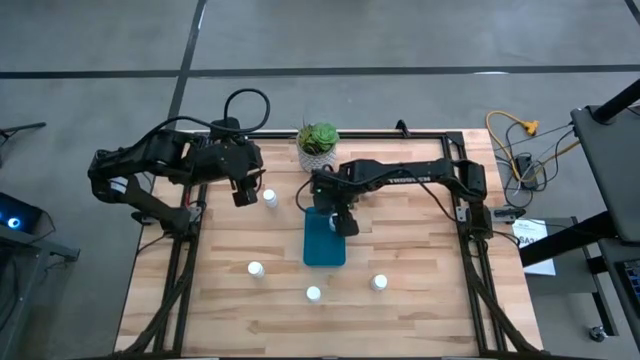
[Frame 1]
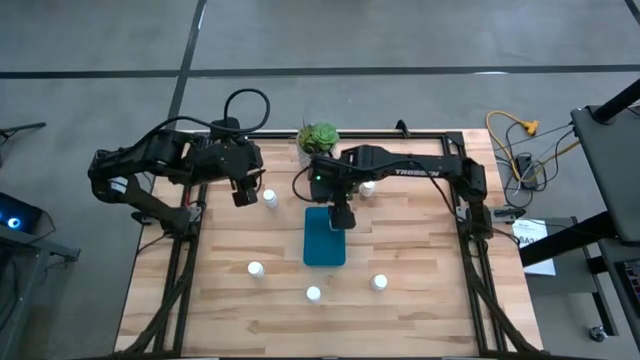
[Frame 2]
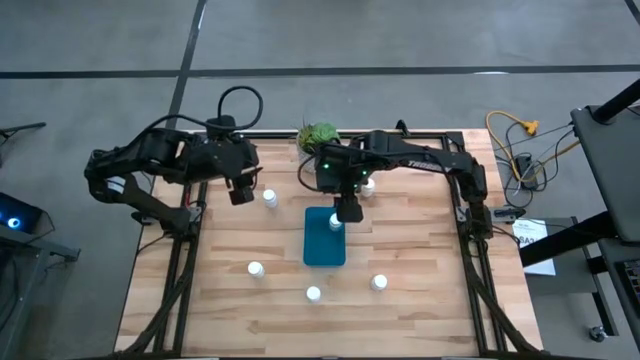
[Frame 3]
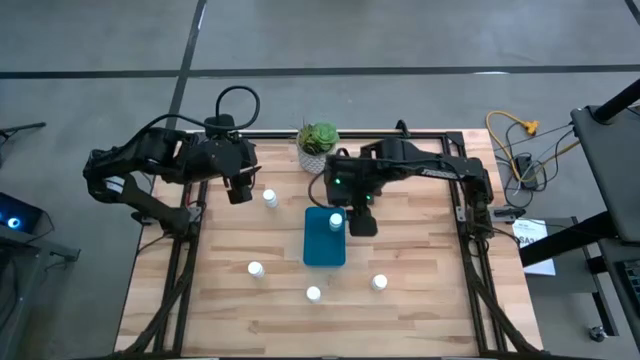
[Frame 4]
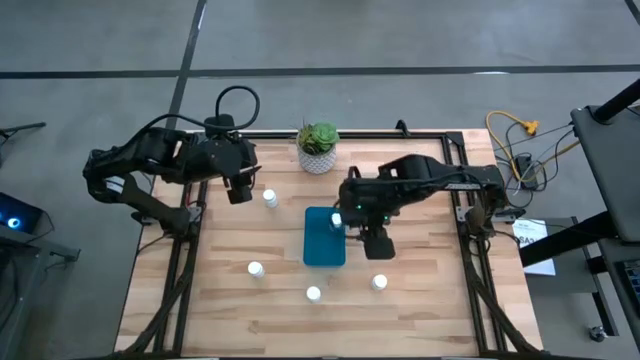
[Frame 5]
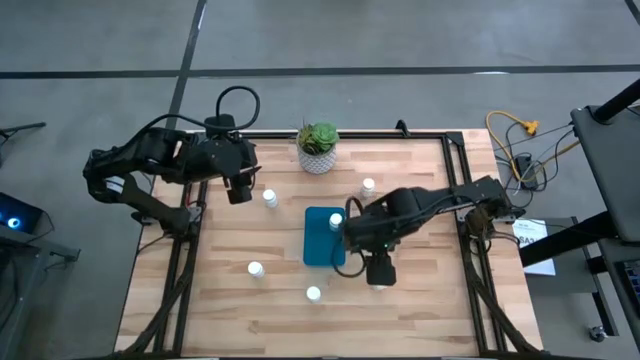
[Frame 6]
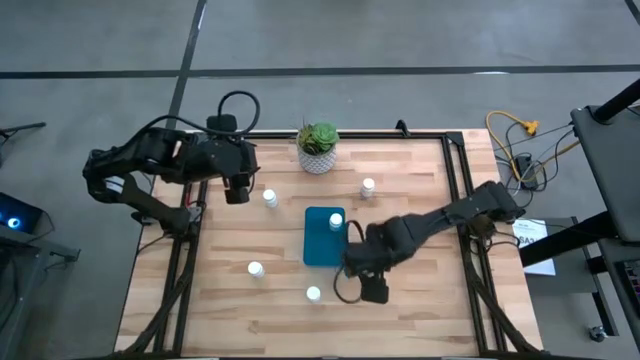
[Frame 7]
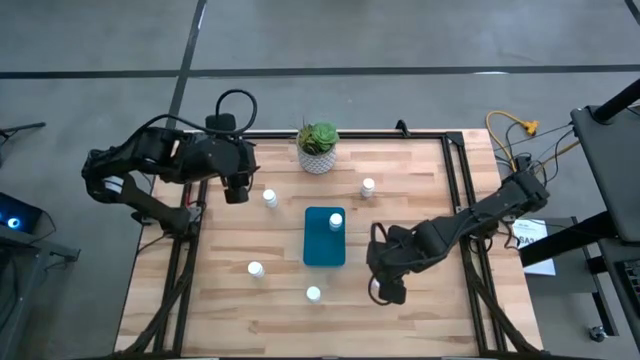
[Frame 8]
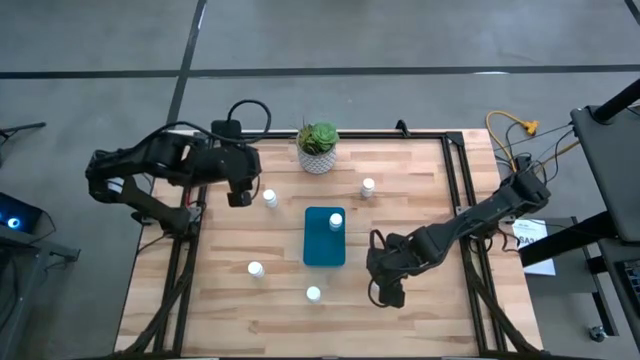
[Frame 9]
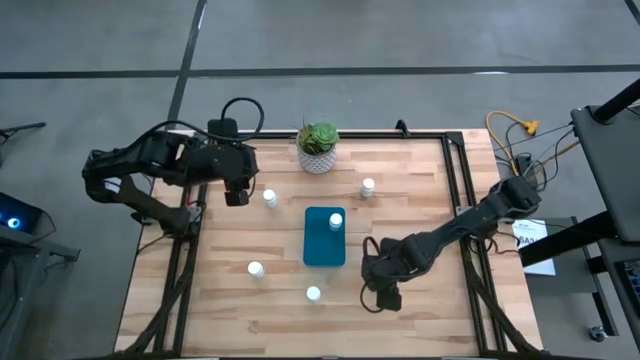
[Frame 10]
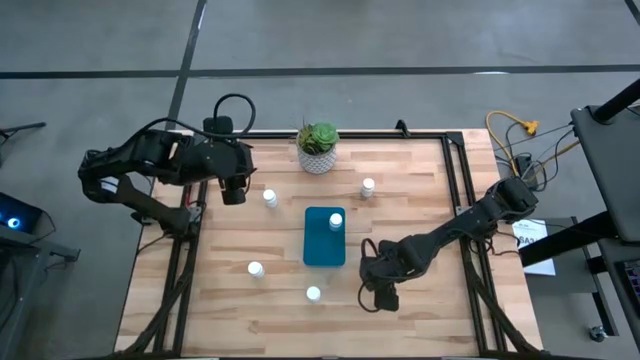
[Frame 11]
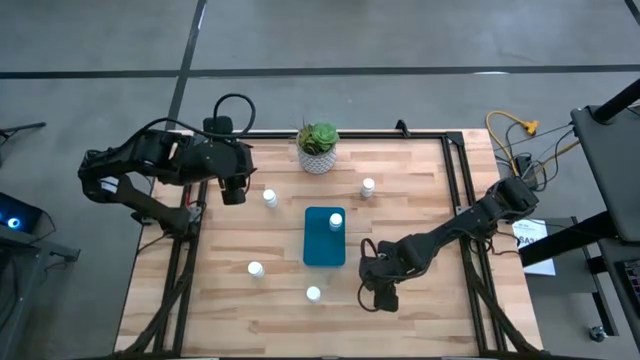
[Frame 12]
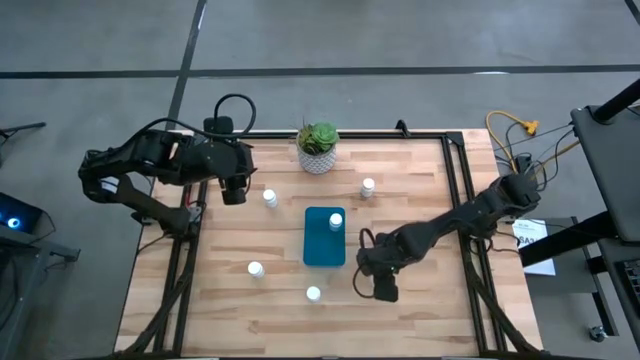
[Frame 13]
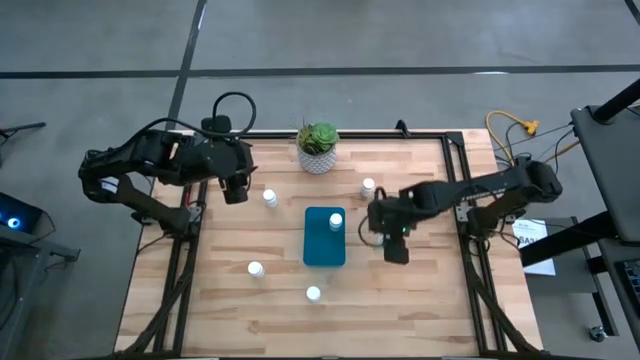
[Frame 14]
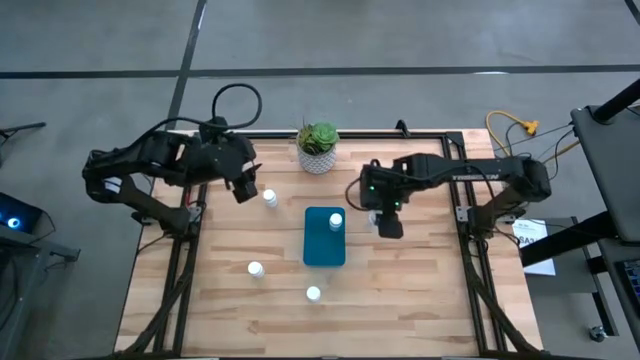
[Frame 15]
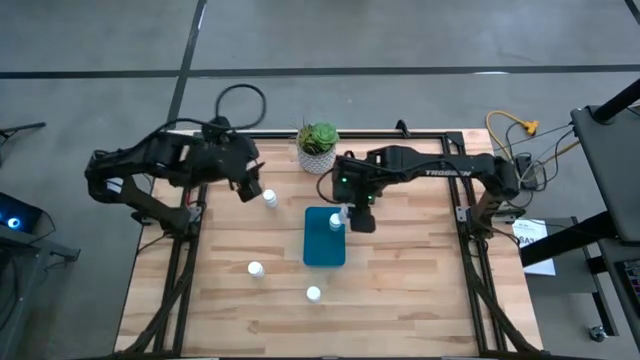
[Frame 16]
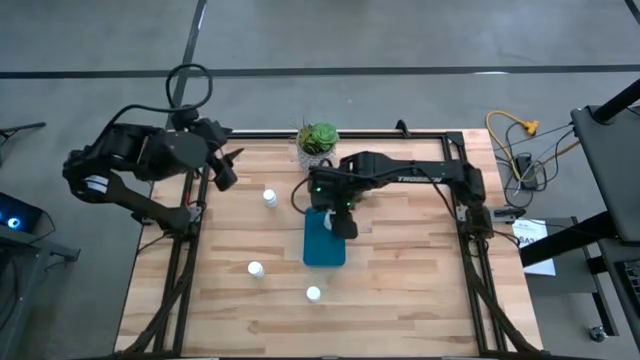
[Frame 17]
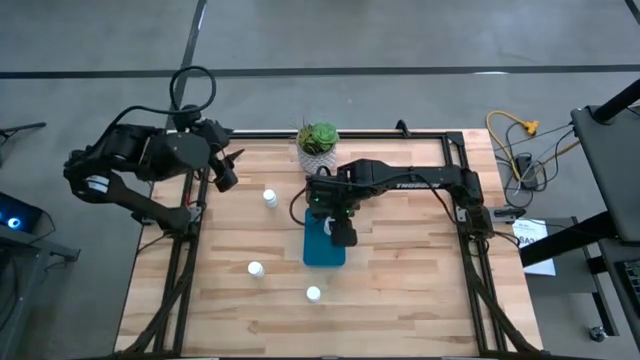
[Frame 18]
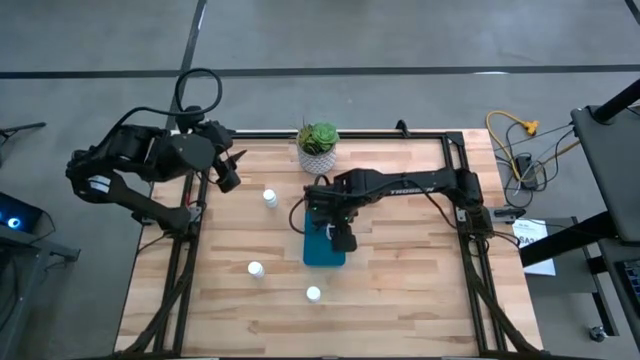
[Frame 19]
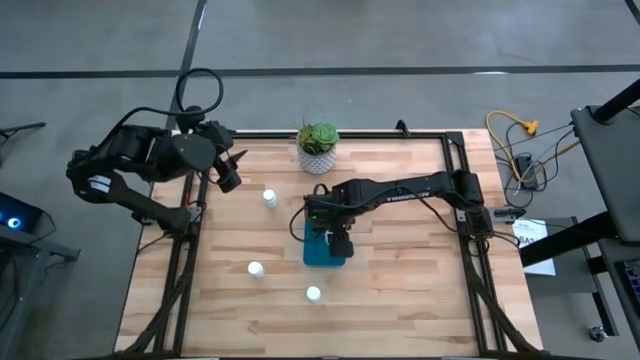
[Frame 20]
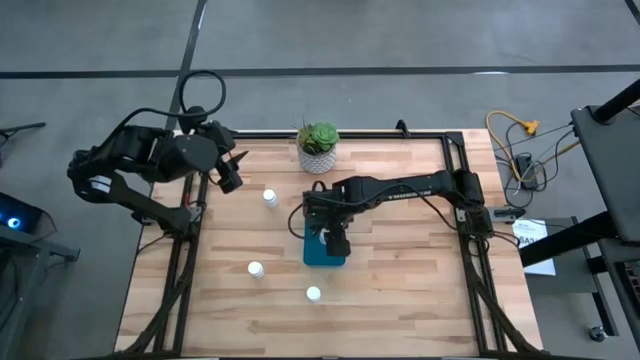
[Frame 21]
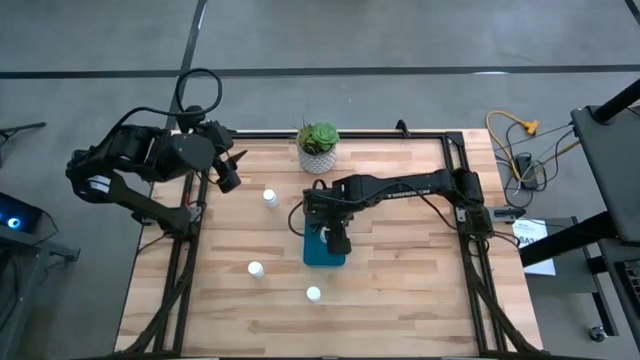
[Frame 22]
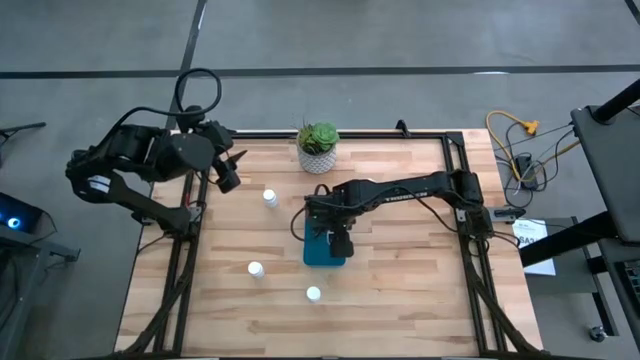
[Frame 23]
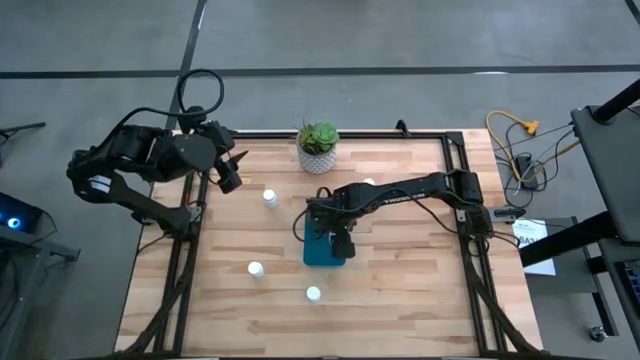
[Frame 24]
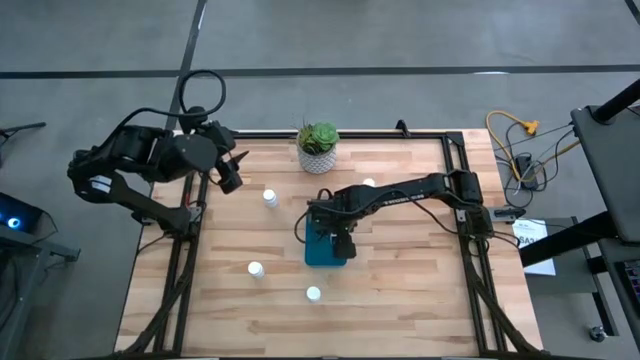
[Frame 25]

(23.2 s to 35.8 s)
Task: Pick and place pill bottles into a basket
Put the white medicine bottle into the blue bin

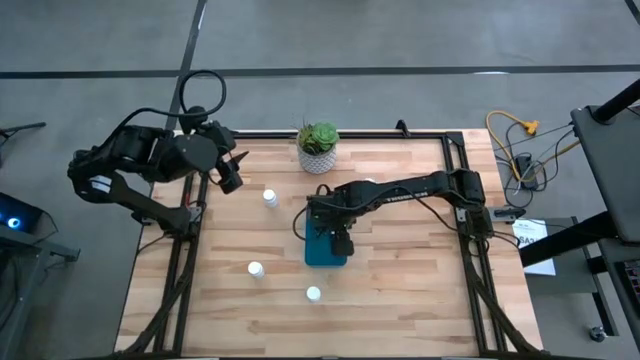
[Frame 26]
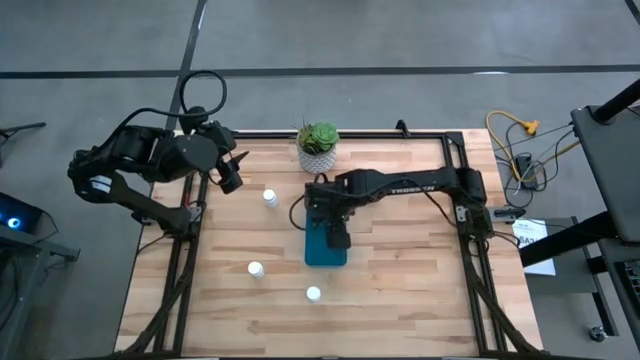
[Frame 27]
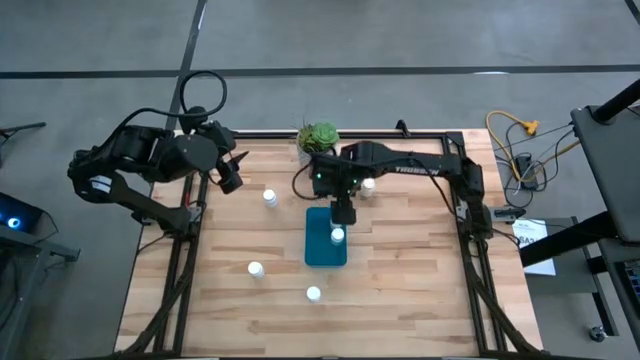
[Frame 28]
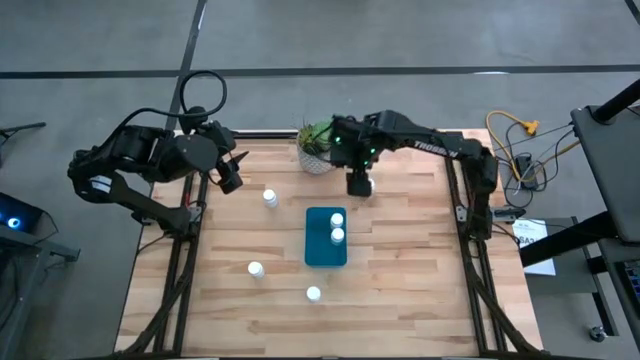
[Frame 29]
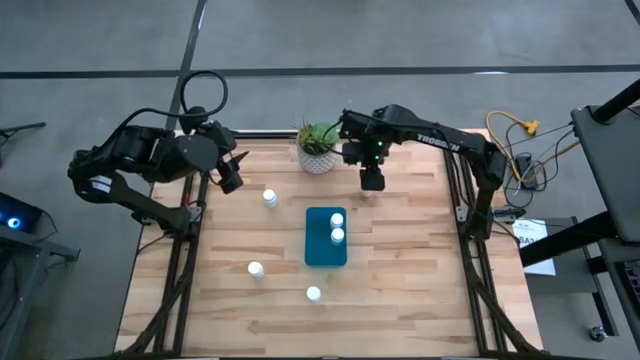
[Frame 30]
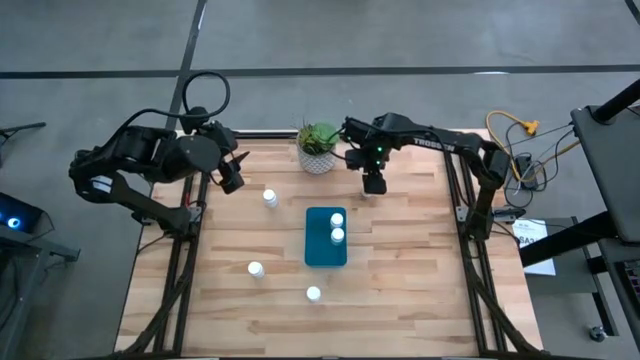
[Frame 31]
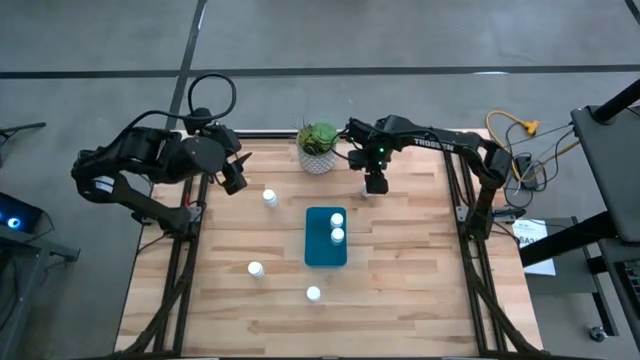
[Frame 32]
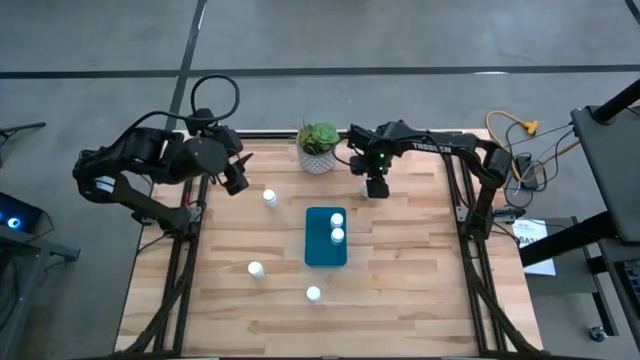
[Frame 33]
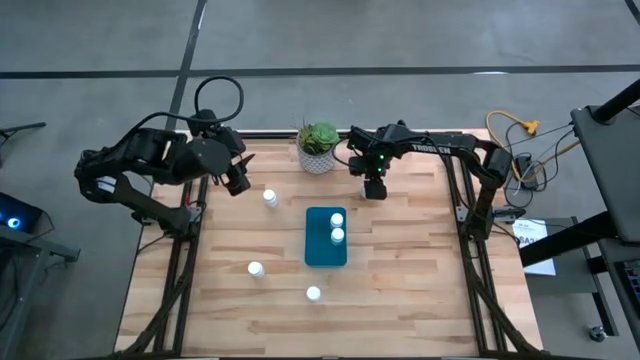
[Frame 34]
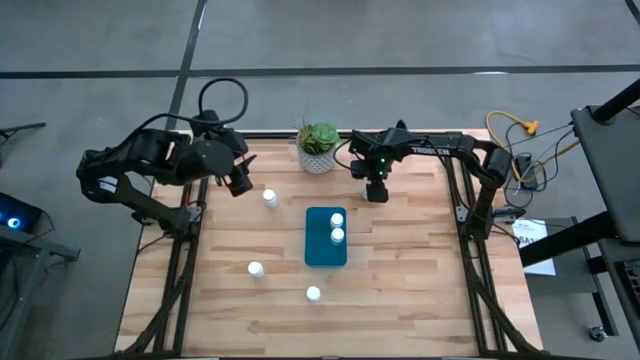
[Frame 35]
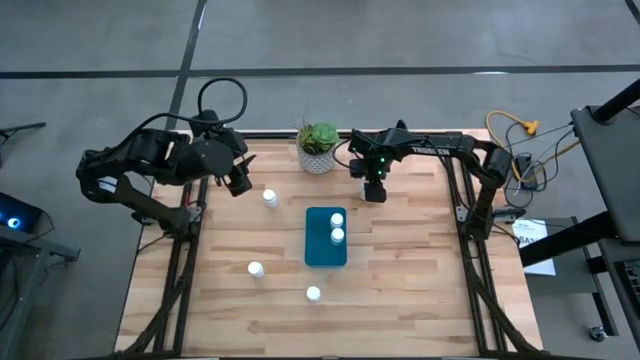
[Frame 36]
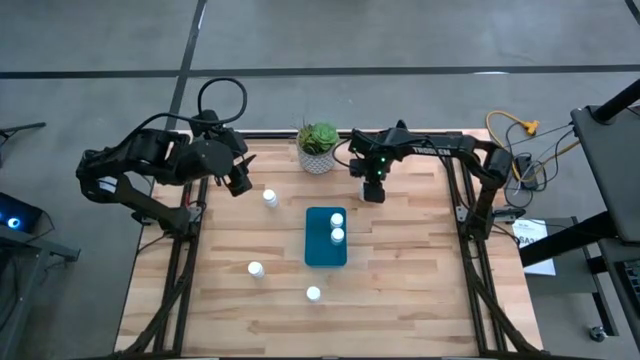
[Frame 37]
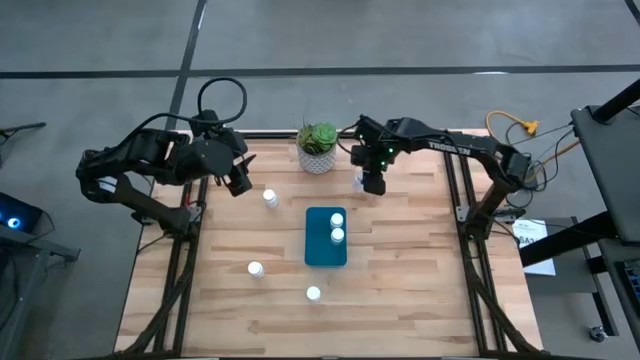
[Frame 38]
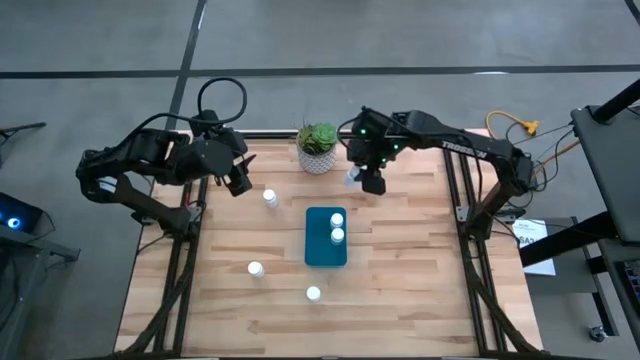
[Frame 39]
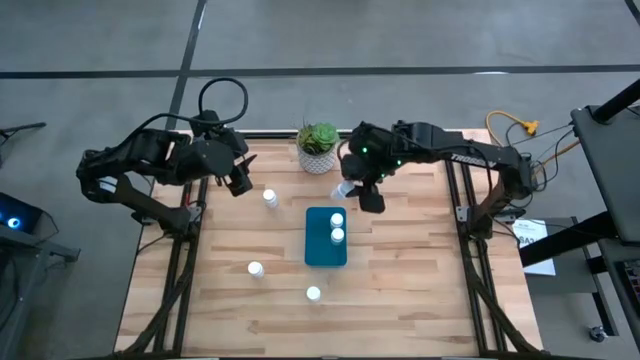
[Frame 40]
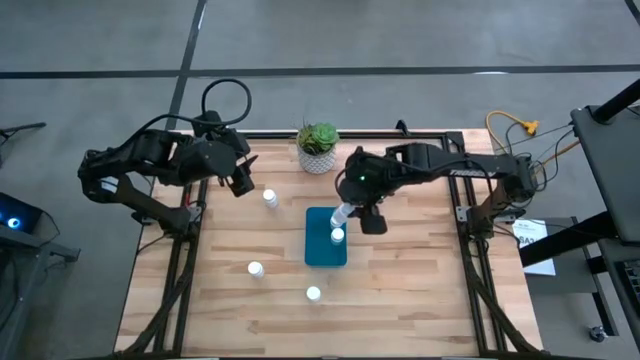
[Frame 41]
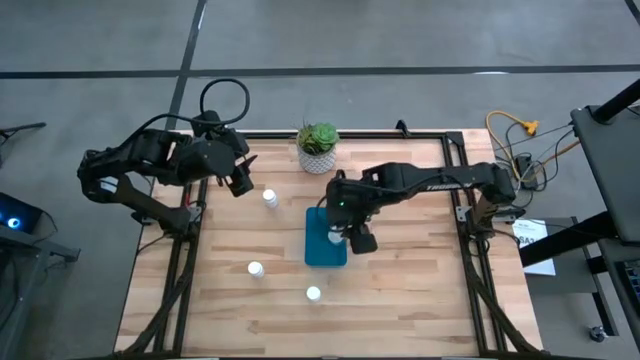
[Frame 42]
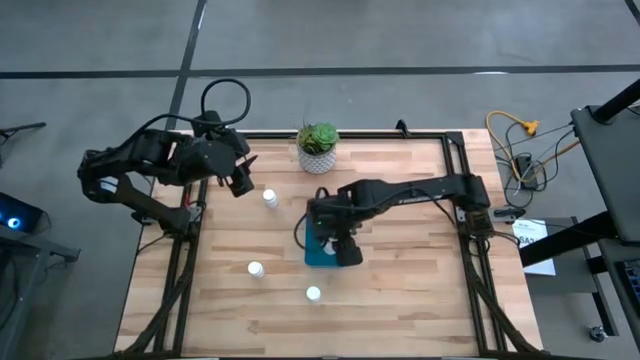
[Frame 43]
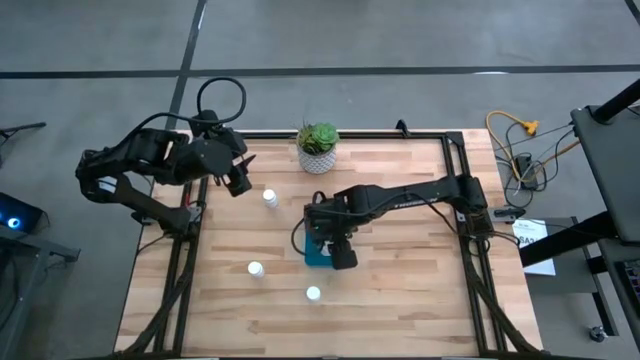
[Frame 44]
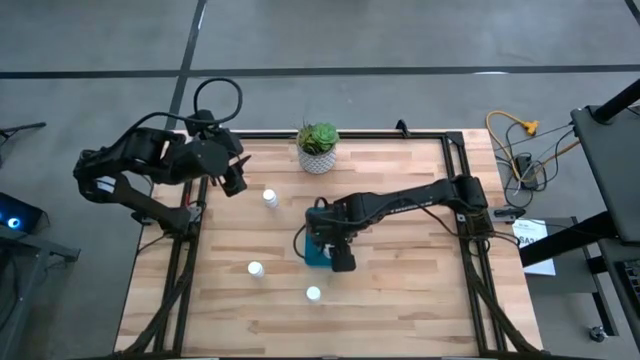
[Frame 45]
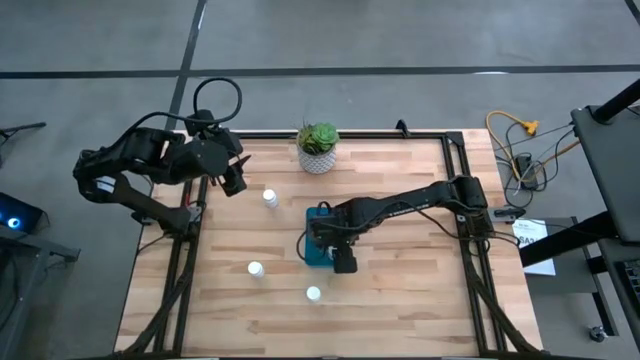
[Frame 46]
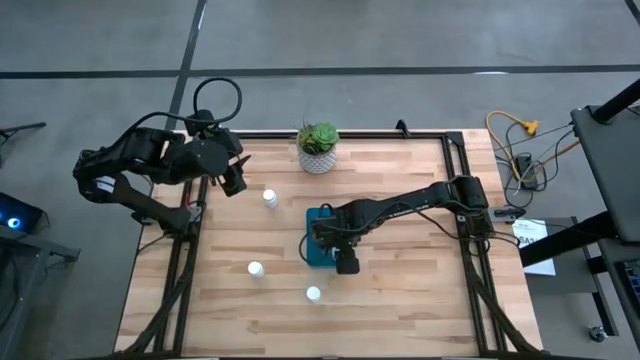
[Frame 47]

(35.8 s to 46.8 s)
Put the white medicine bottle into the blue bin
